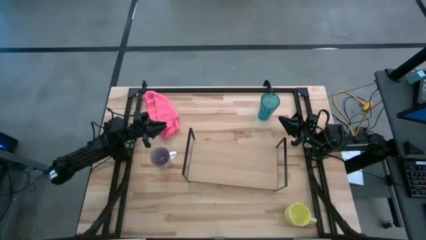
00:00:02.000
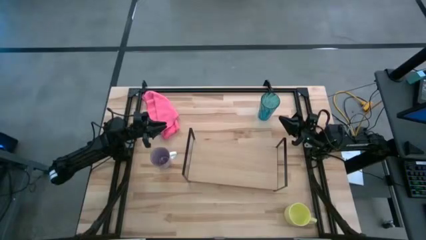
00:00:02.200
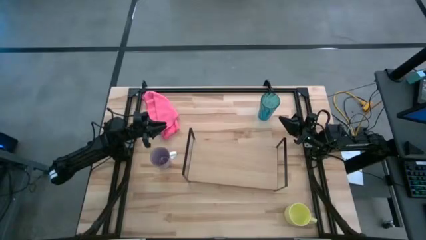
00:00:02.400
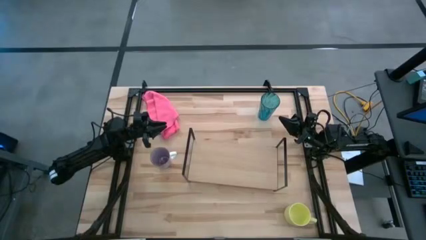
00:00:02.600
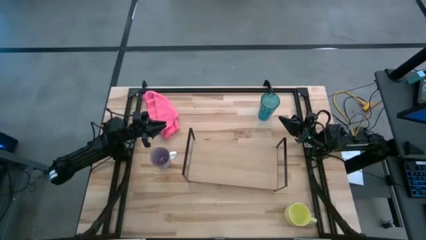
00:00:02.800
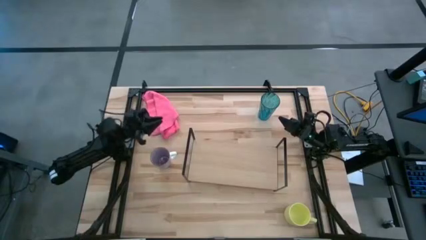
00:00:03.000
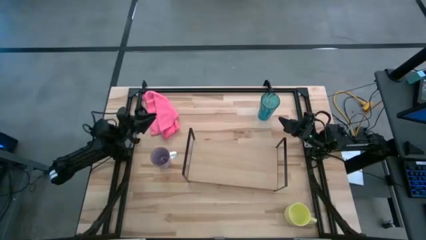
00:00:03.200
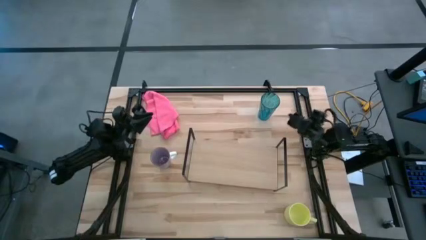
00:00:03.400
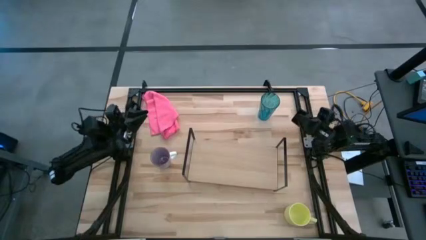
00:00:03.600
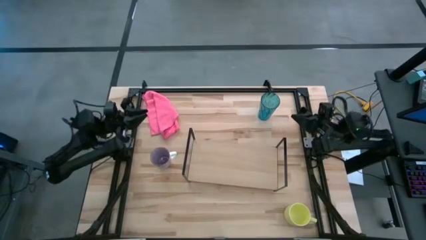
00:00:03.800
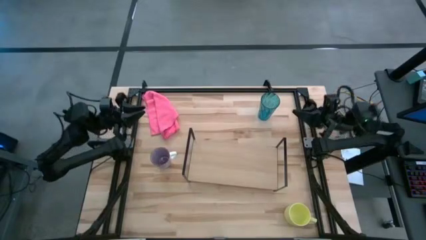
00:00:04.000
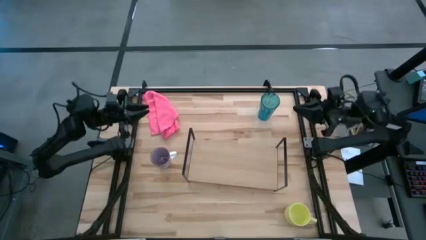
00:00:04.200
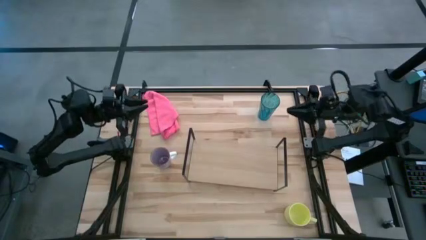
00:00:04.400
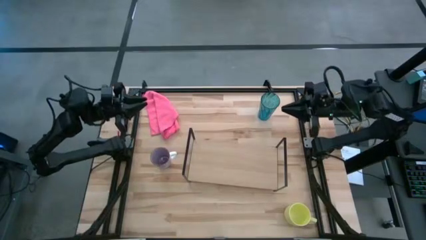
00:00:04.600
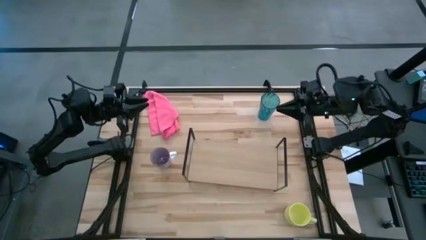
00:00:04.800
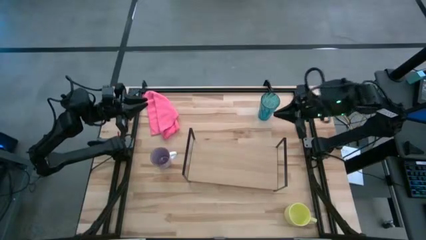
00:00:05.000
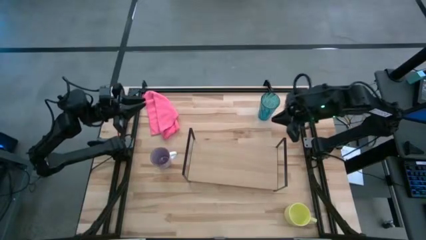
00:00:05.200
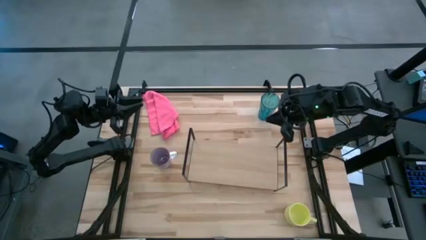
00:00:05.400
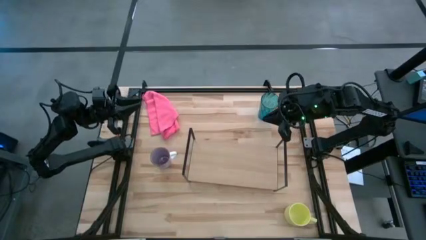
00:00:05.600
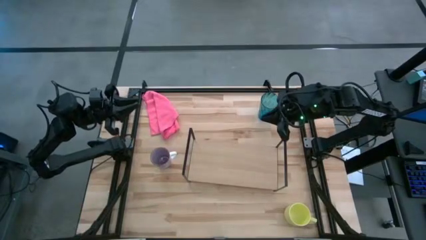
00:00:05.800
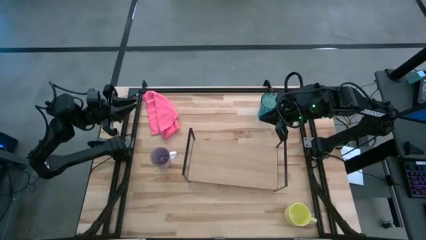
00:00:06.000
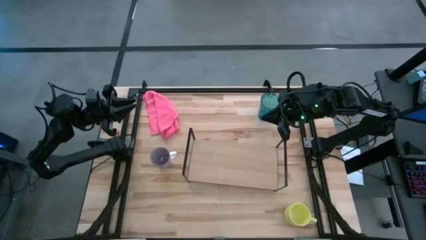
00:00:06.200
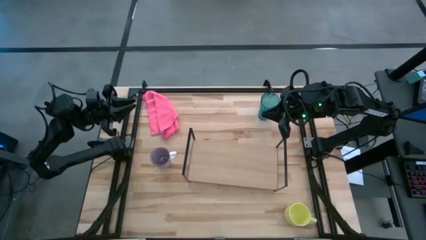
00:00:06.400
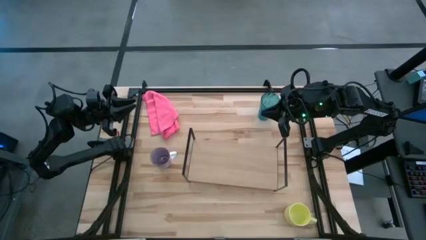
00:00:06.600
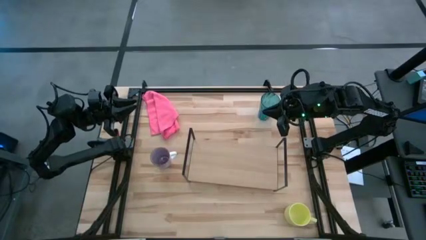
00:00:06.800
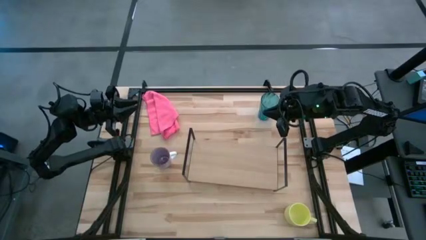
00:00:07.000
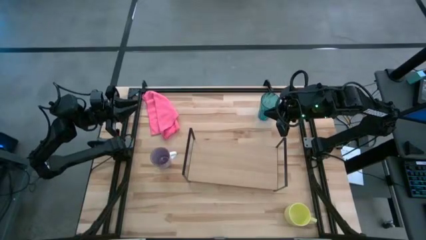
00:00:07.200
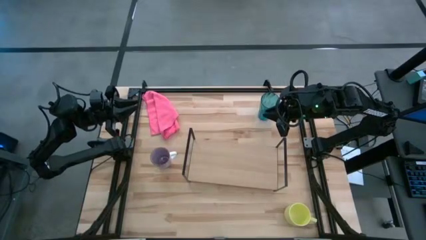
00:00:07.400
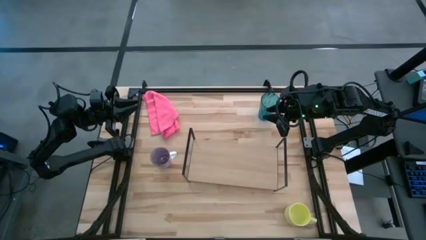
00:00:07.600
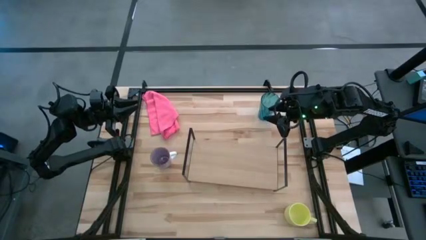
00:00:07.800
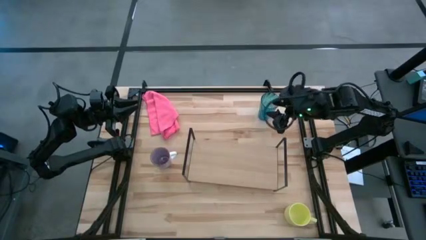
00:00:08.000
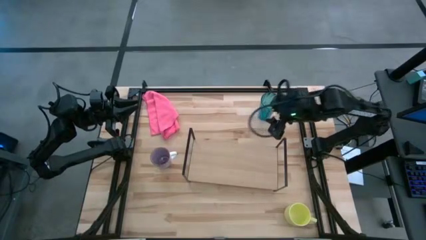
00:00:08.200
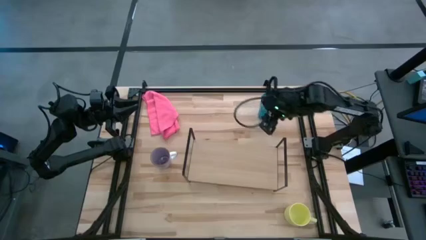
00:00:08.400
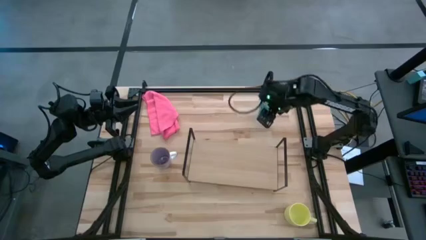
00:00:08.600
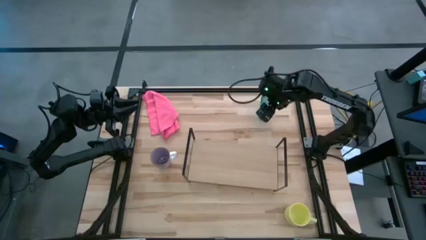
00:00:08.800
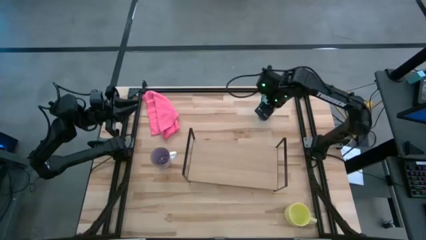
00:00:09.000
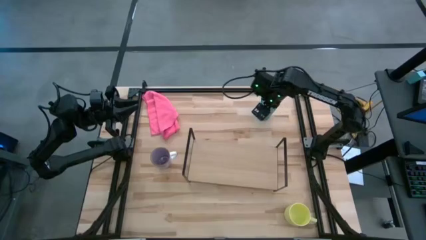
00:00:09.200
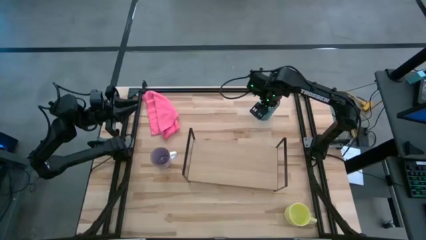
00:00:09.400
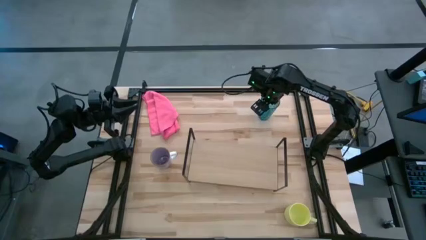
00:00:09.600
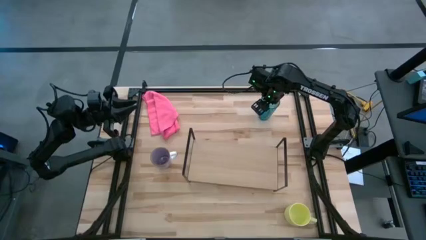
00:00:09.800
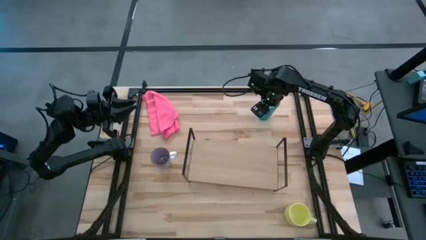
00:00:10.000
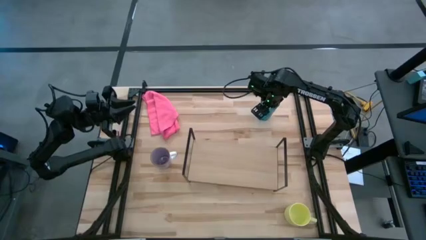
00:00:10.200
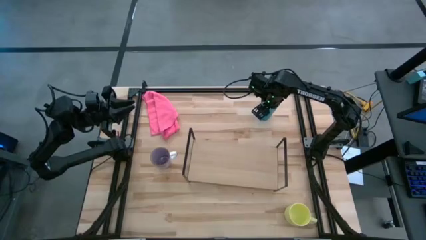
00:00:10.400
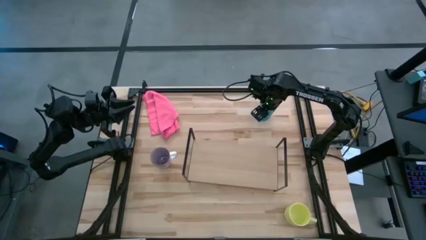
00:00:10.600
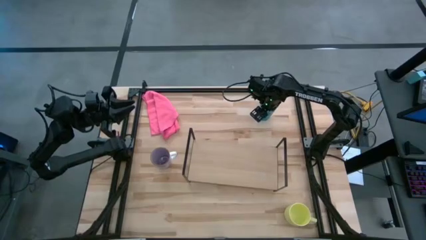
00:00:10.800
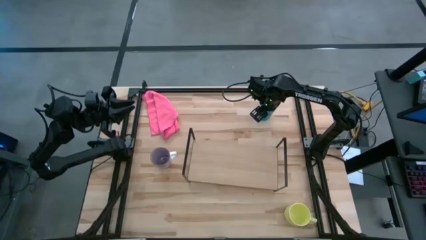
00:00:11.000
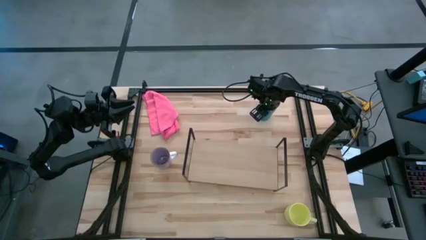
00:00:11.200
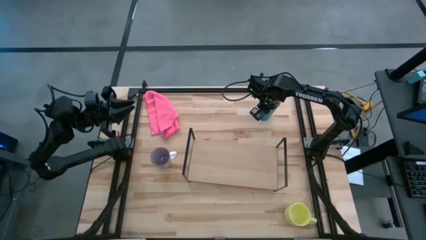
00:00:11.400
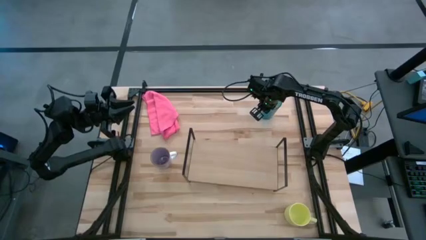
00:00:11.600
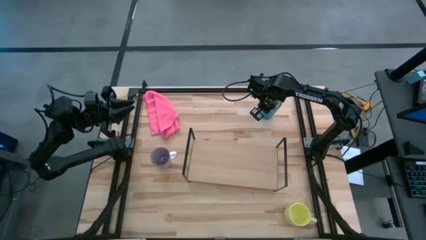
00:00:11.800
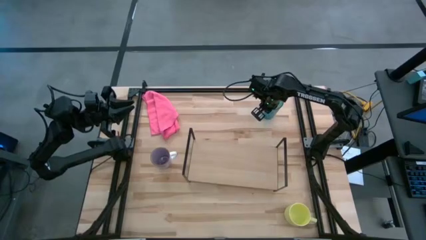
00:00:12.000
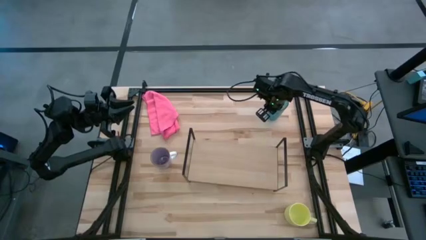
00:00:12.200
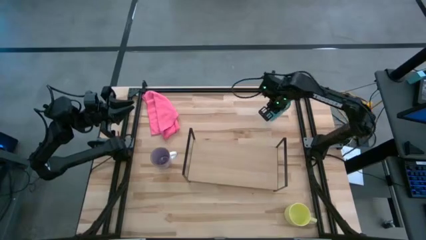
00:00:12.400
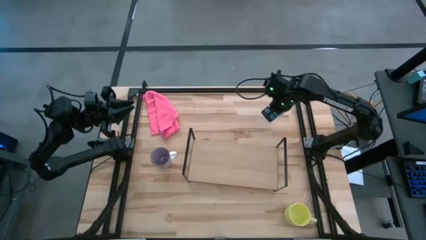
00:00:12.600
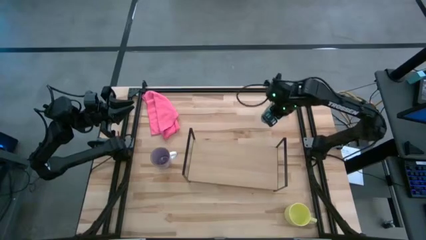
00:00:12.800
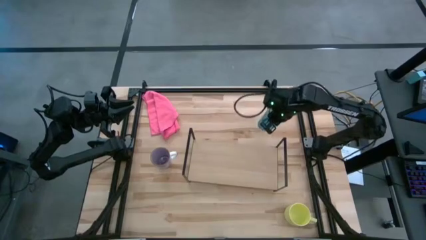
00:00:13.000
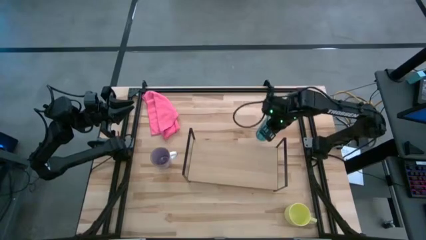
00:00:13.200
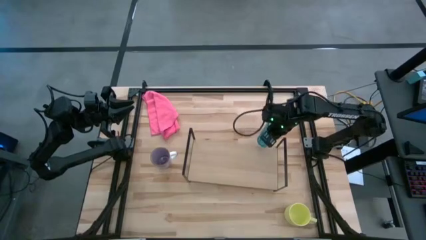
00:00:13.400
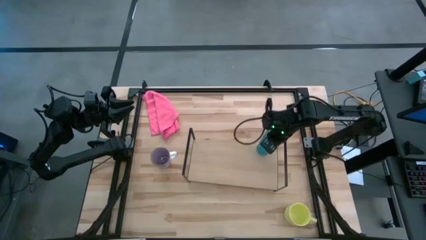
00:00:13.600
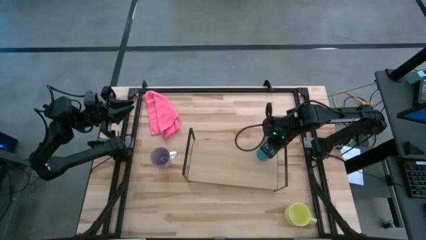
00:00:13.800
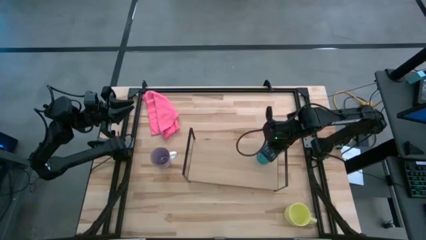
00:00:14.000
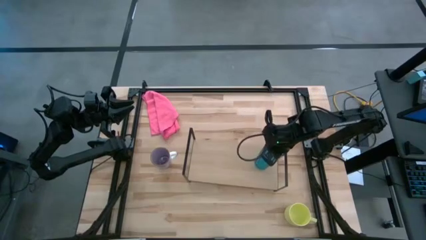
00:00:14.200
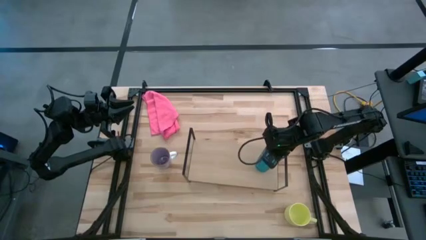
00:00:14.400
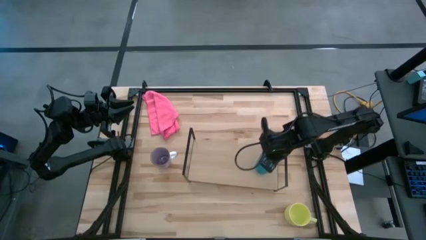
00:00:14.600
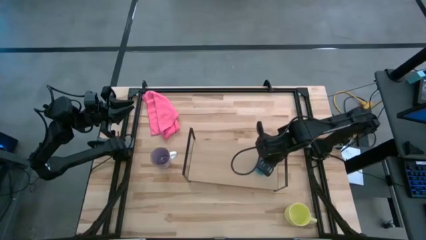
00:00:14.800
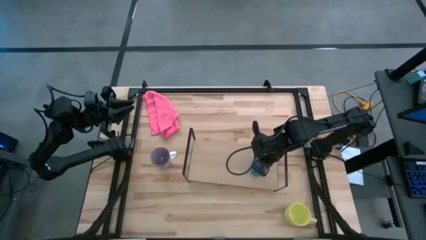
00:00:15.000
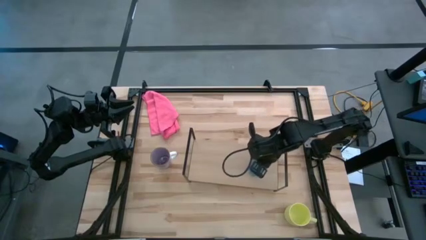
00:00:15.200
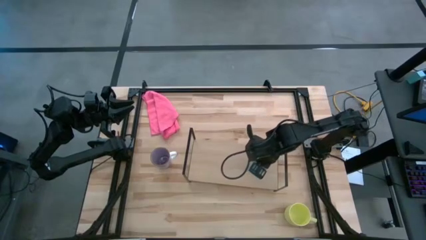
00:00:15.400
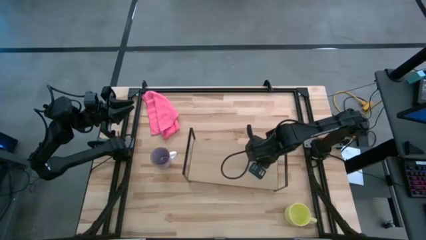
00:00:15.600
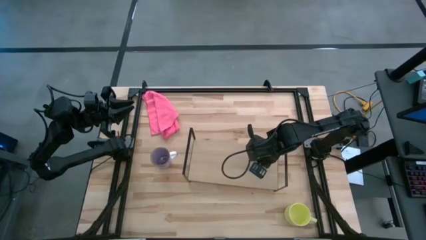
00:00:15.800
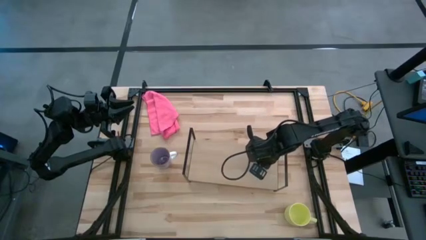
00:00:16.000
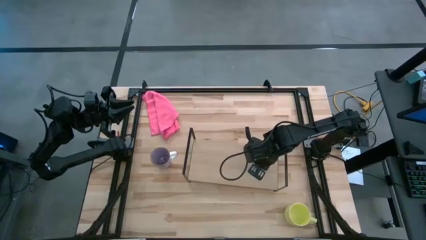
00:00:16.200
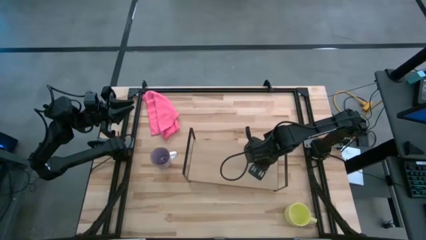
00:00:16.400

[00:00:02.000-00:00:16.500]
Task: Stack small to large cups/mugs on shelf
Put blue transparent cup on the shelf
